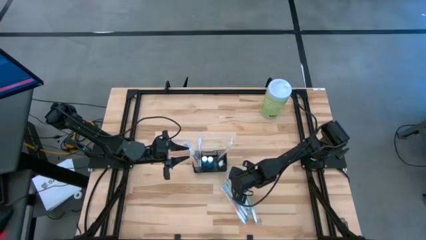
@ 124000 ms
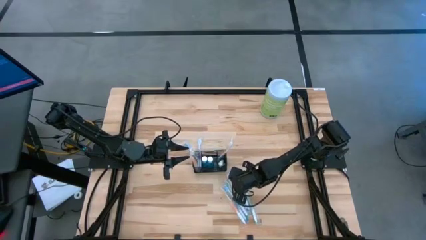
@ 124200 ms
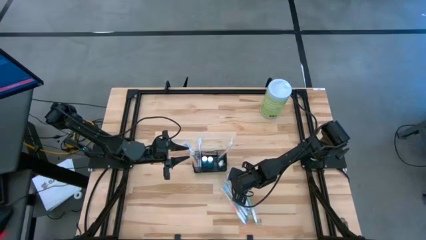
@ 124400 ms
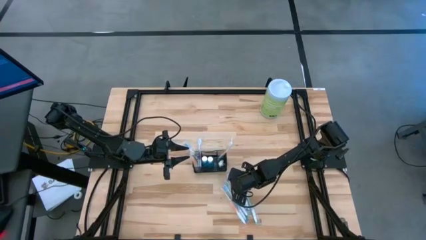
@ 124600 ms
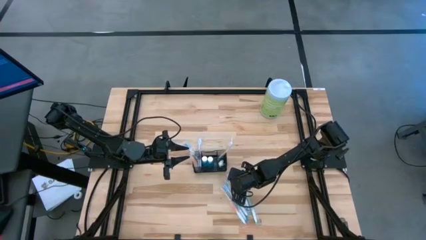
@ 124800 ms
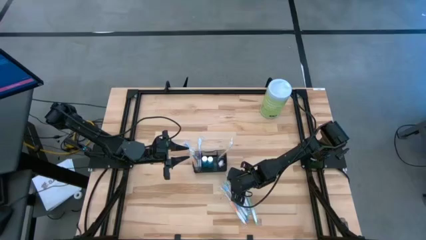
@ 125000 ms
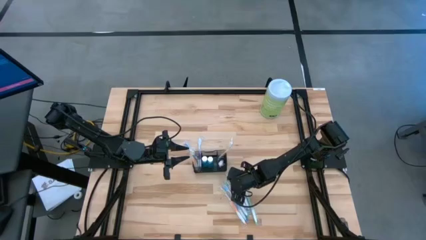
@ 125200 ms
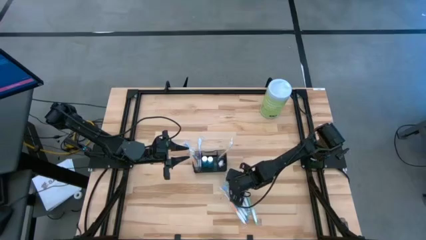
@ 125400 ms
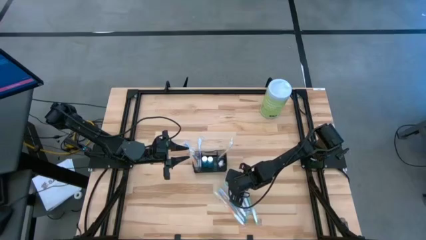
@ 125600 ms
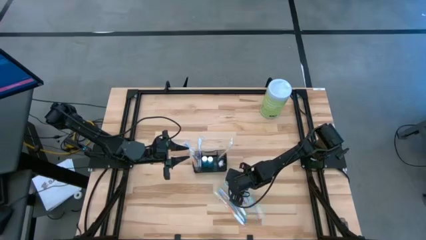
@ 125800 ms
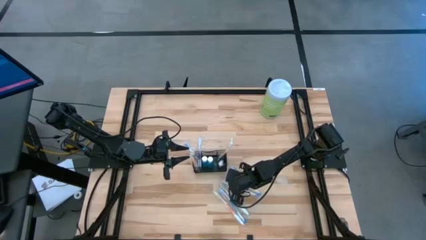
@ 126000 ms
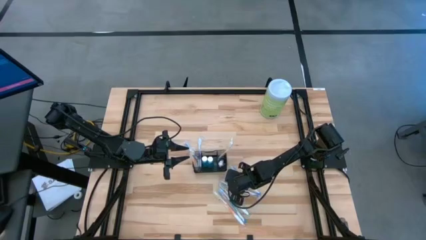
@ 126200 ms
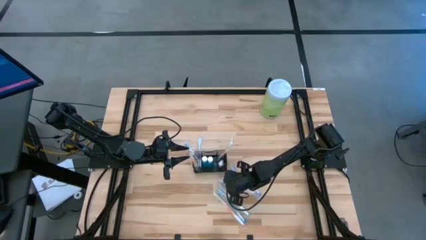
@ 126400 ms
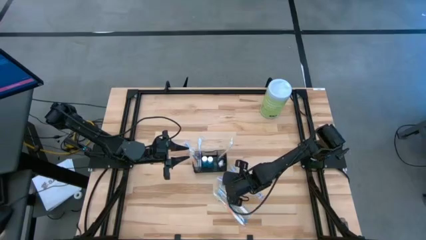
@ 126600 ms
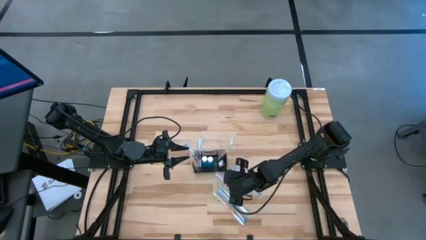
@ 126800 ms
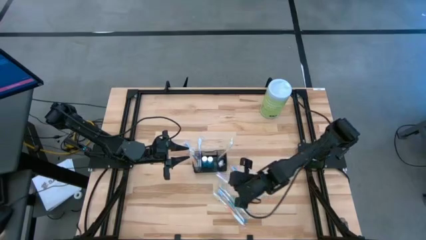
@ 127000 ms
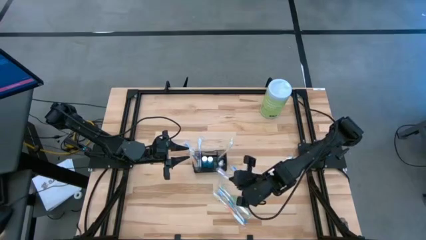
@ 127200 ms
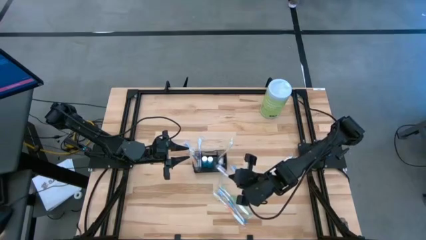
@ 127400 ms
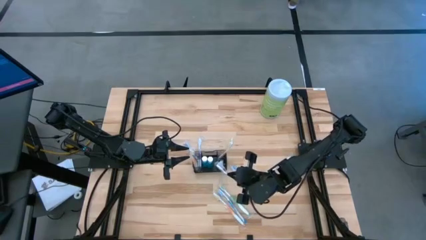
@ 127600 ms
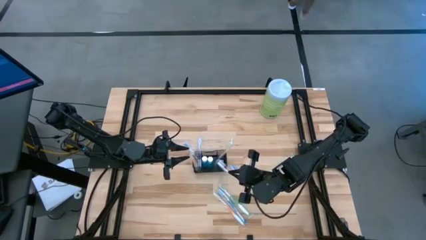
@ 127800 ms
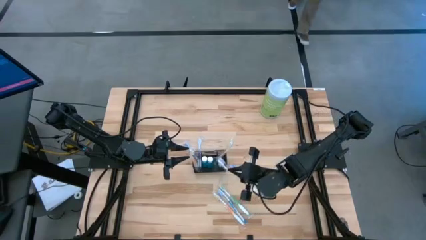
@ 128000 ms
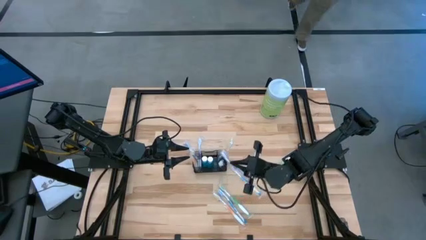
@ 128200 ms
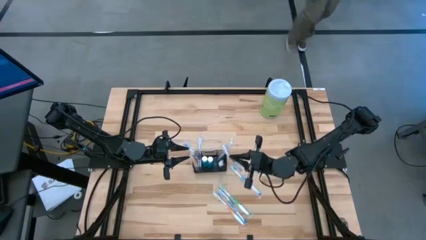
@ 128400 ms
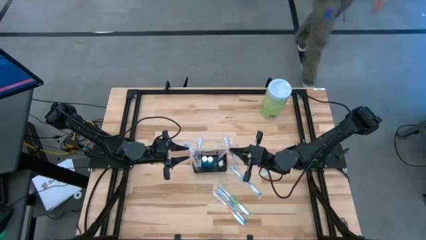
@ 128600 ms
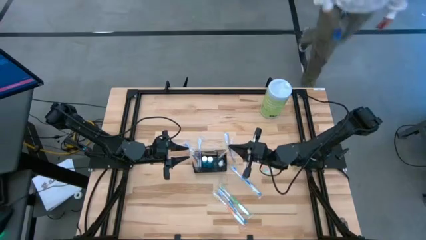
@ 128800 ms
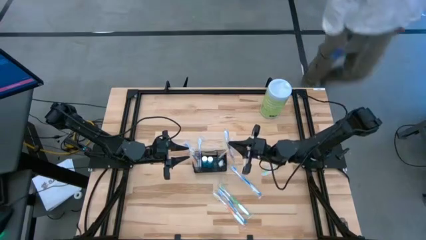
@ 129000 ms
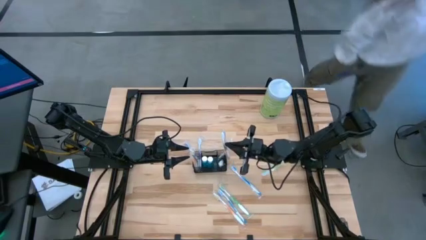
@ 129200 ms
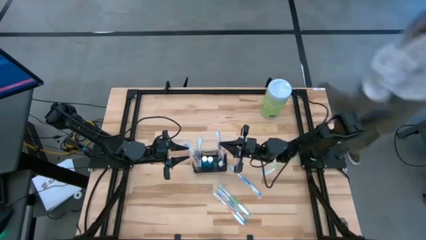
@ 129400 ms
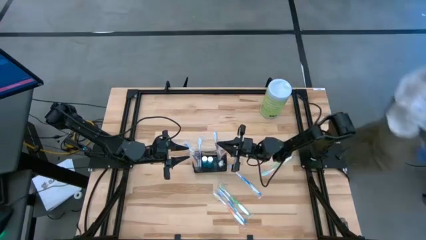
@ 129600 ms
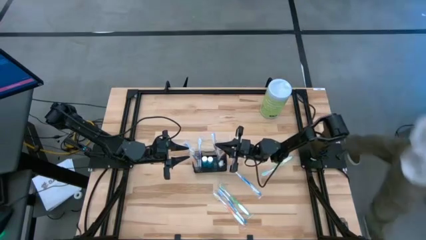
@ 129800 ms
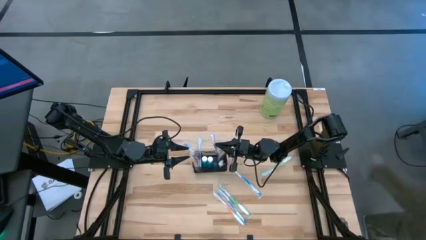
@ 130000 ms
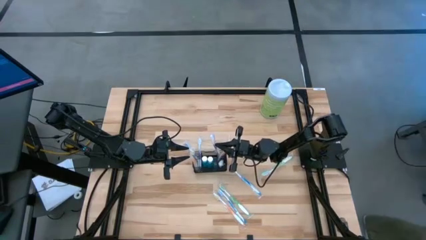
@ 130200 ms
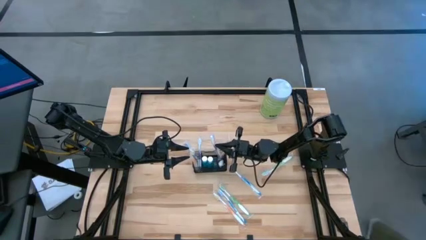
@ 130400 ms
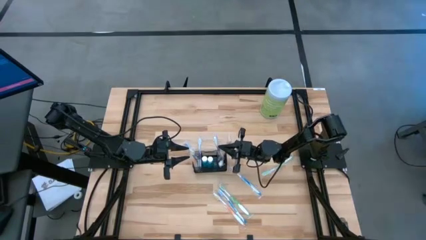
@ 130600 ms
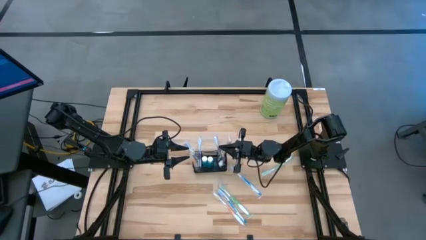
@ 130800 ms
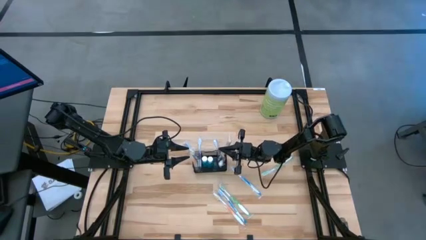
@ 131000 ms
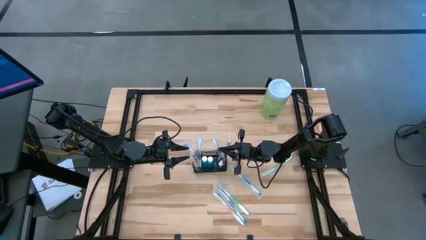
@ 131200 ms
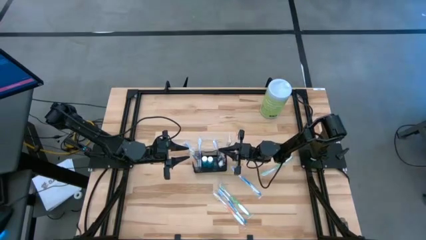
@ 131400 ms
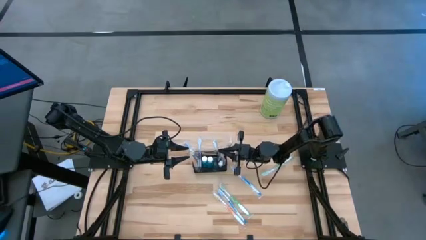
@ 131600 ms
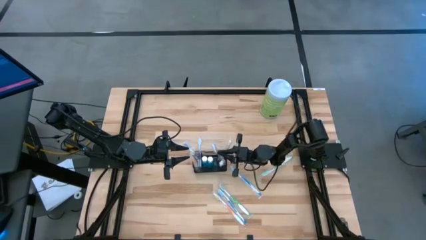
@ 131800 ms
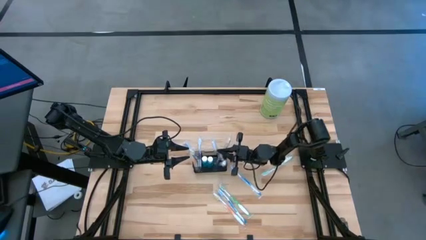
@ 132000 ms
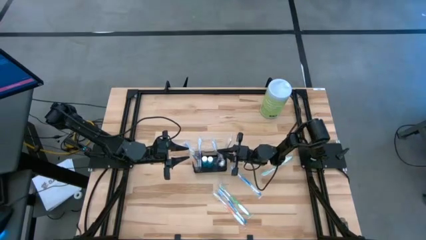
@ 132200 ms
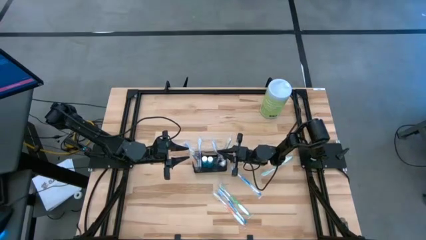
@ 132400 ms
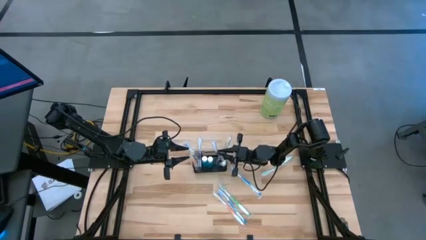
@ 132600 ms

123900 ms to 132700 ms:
Task: Pick & Place toothbrushing station
Put the purple toothbrush into the mesh

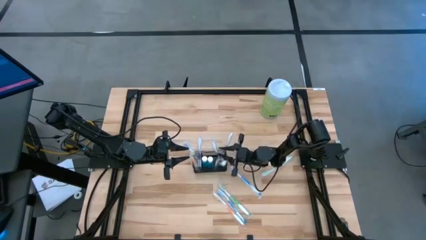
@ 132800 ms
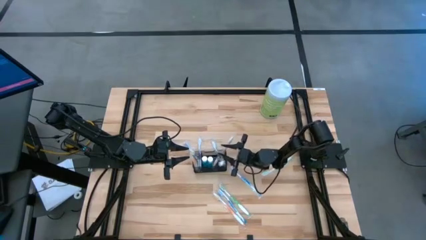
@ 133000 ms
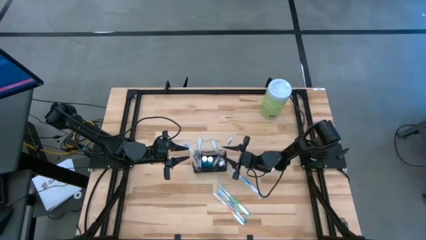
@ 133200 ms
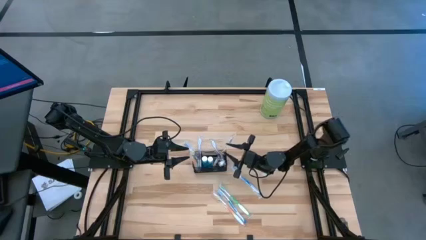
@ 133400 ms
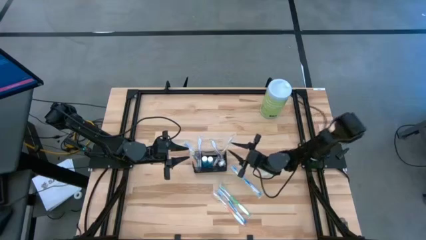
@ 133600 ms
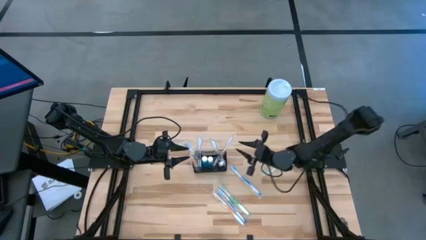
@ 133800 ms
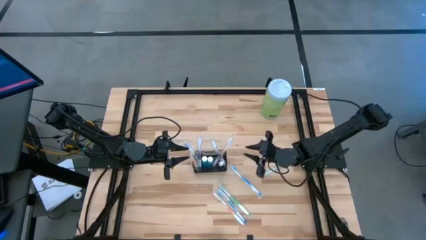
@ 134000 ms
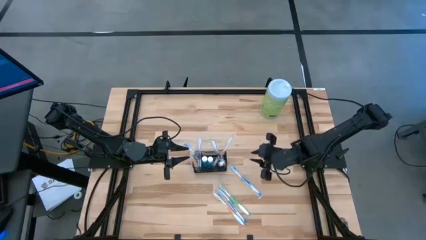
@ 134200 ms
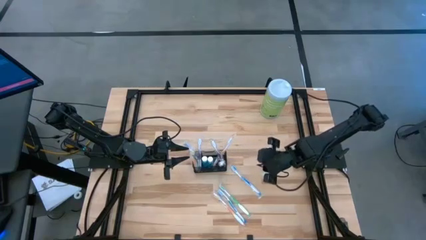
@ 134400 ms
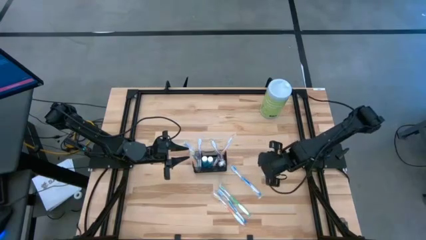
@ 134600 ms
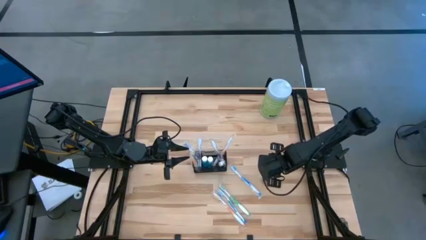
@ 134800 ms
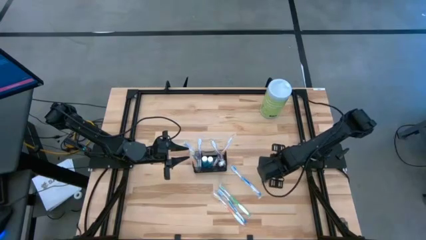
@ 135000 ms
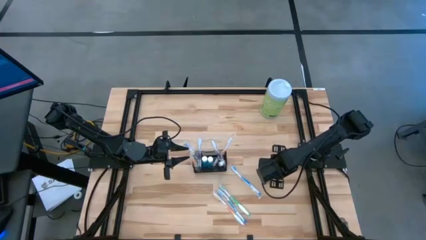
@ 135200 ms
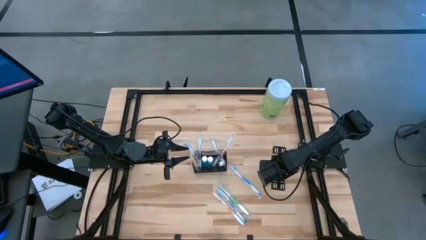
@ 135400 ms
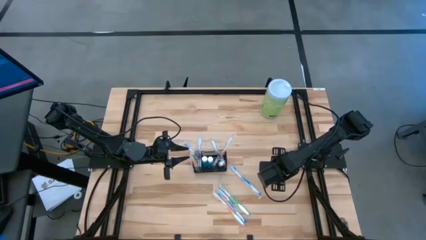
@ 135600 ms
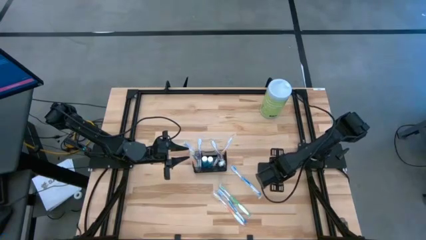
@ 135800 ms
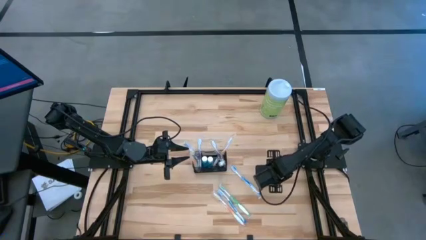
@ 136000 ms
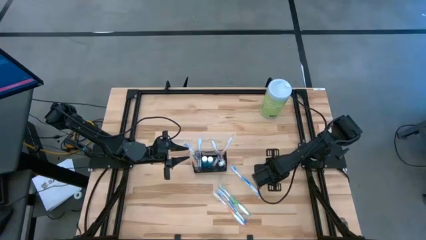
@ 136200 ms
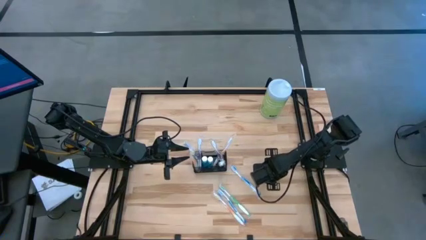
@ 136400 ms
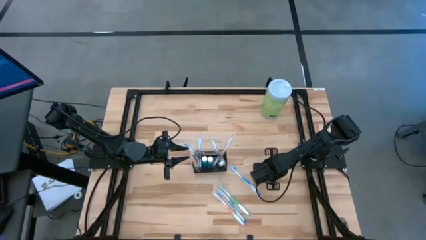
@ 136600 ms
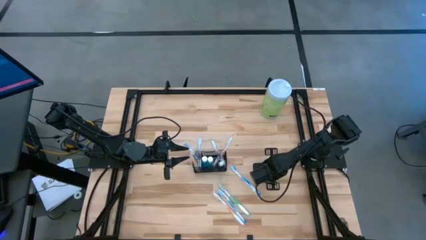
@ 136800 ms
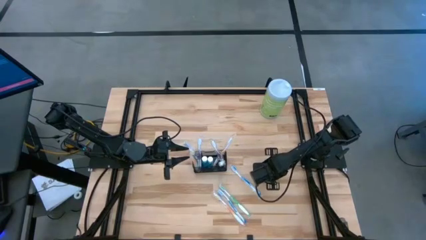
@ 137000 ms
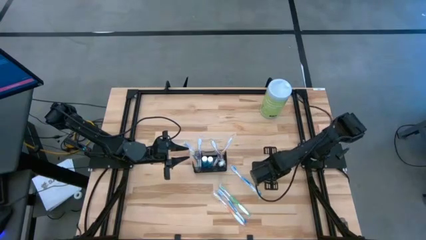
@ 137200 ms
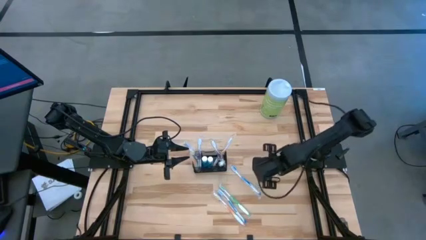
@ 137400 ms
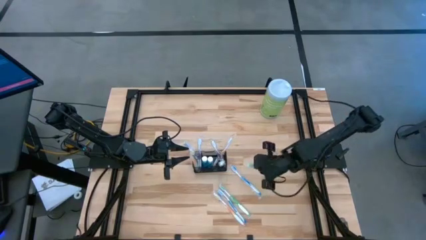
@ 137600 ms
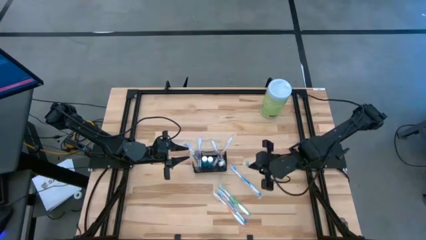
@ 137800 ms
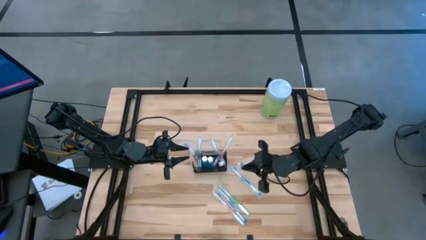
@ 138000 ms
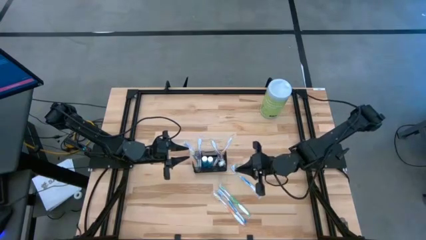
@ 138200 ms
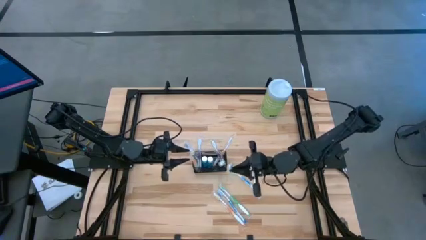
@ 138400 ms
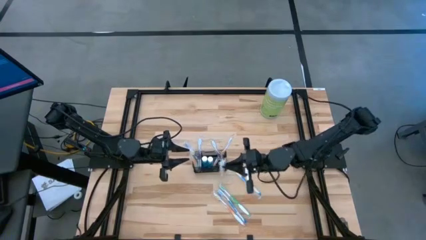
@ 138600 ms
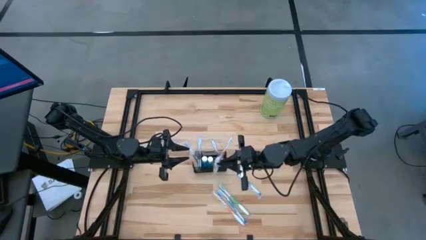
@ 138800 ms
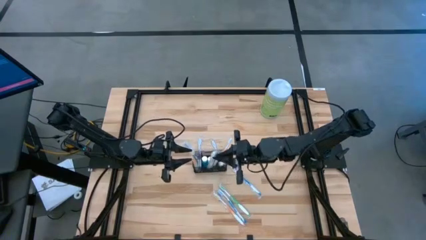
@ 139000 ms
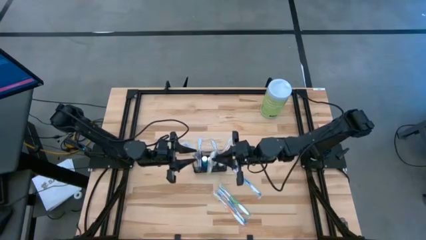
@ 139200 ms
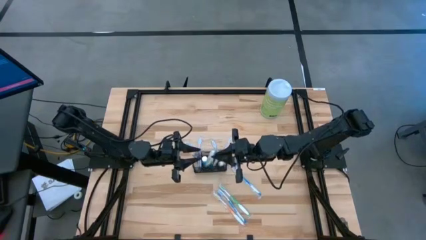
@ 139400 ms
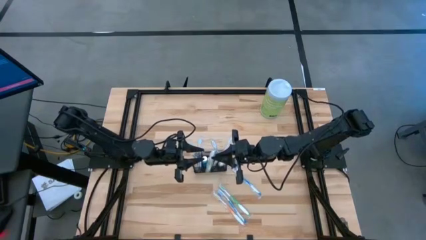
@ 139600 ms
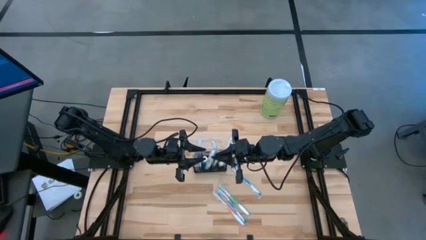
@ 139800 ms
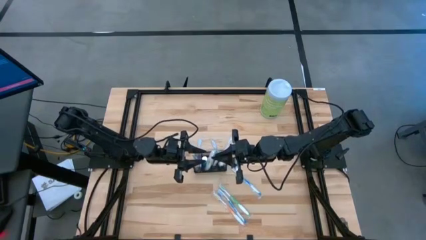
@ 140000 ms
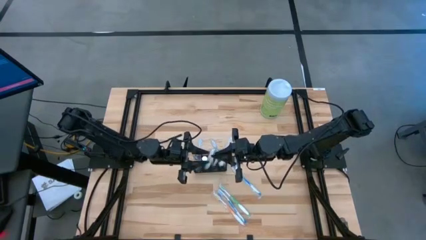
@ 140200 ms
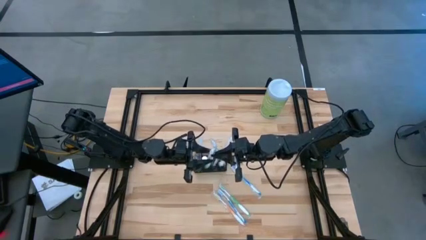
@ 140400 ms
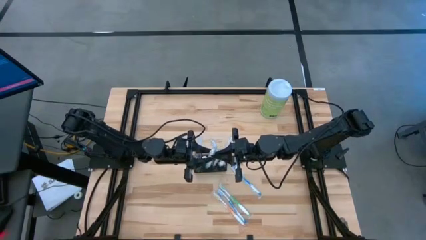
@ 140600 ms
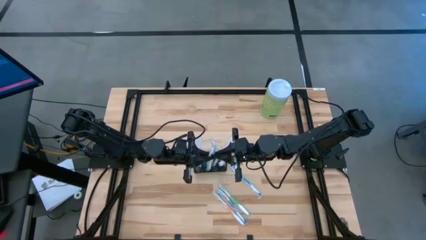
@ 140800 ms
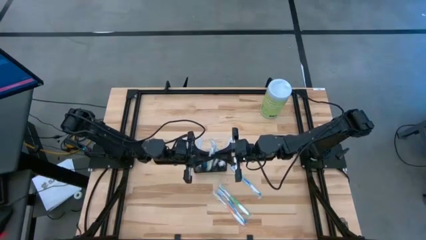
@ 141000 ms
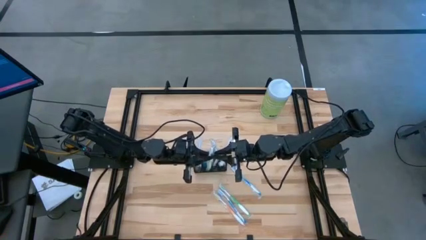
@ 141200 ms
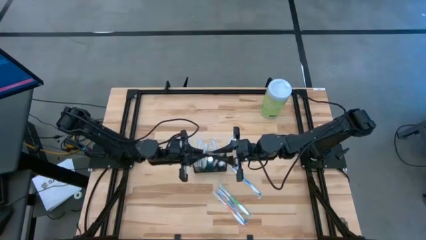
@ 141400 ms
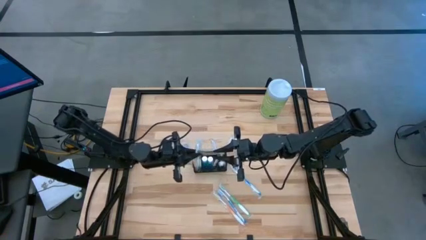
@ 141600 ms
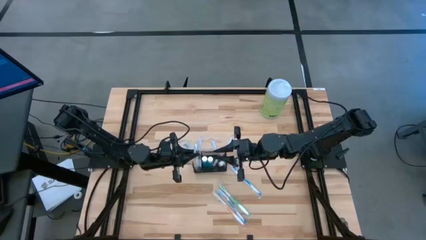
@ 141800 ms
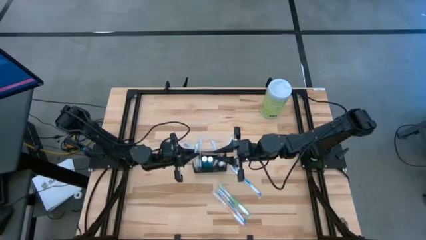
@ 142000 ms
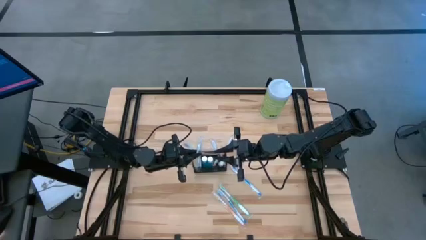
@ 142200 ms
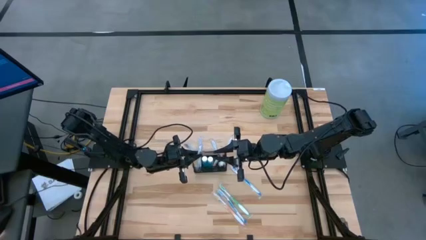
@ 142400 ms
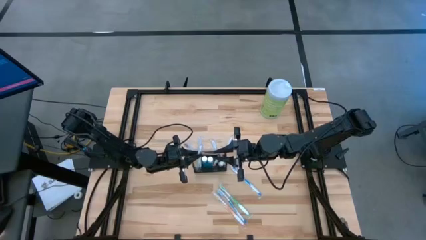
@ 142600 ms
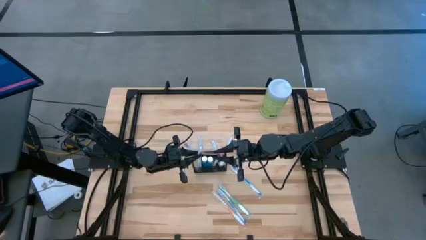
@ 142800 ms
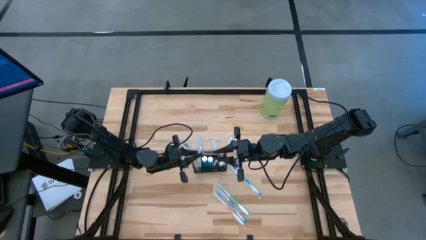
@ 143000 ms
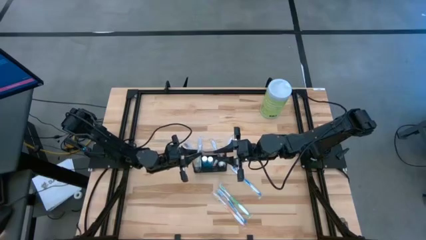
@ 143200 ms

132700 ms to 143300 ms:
Put the green toothbrush into the mesh
